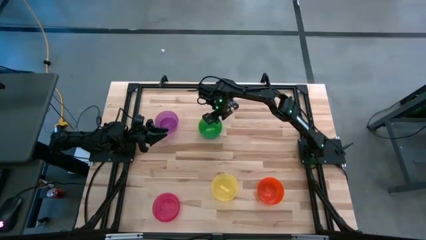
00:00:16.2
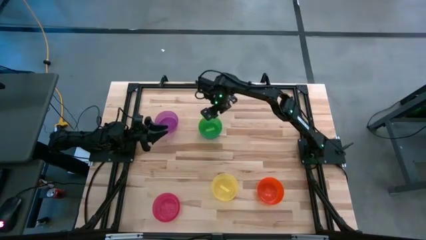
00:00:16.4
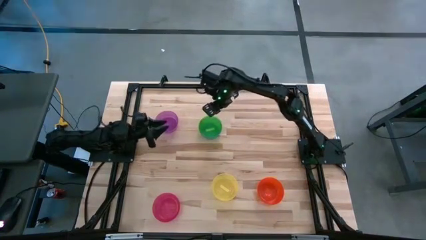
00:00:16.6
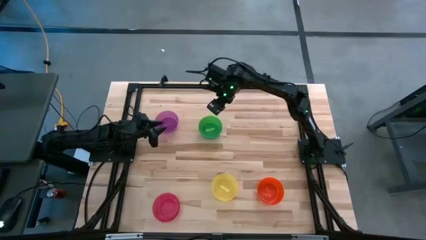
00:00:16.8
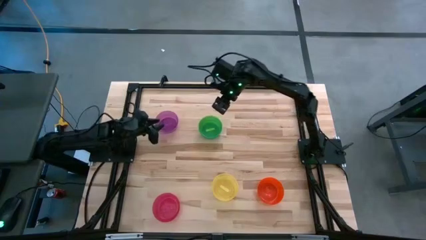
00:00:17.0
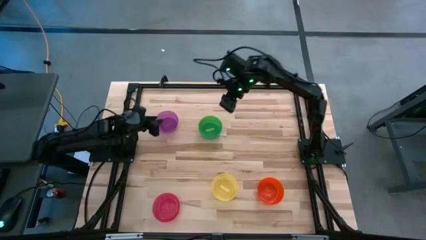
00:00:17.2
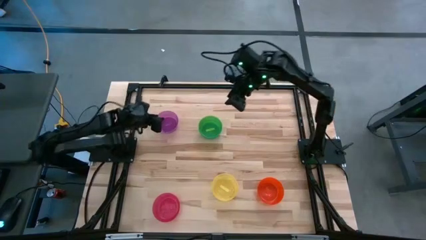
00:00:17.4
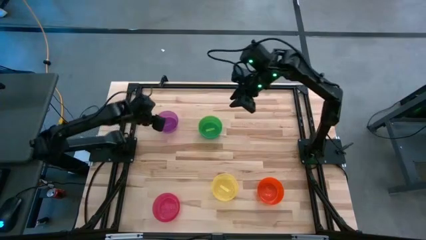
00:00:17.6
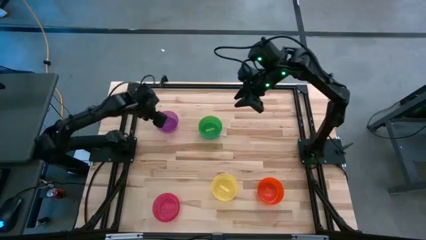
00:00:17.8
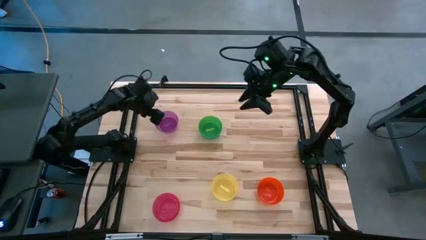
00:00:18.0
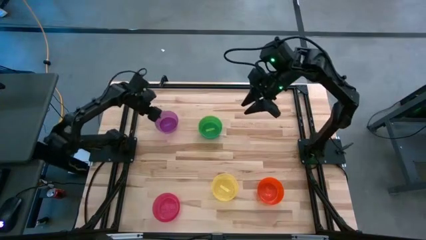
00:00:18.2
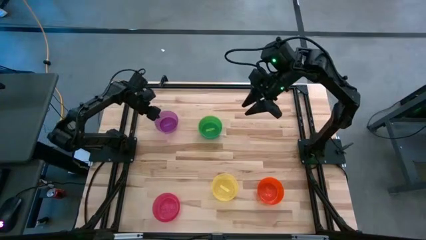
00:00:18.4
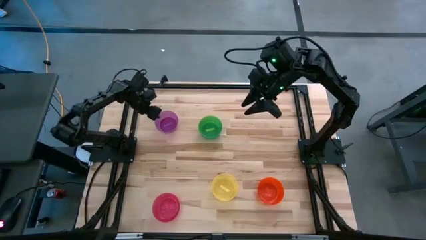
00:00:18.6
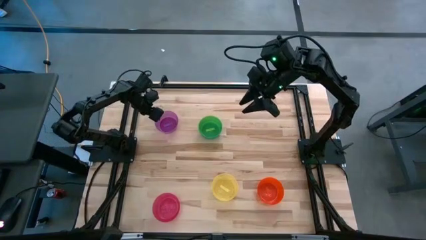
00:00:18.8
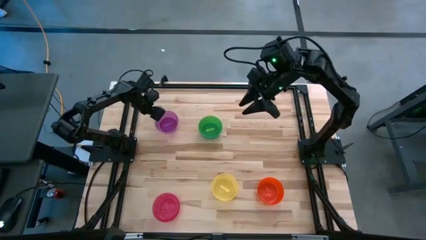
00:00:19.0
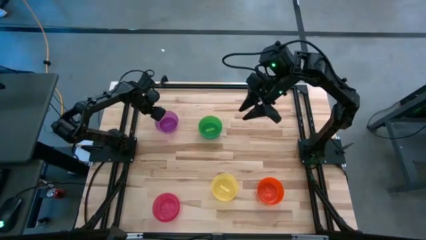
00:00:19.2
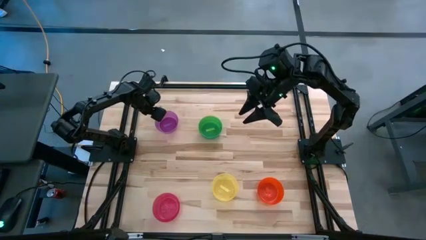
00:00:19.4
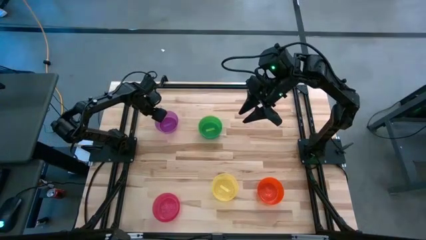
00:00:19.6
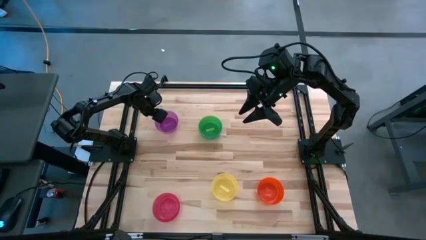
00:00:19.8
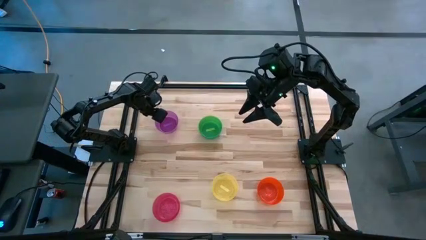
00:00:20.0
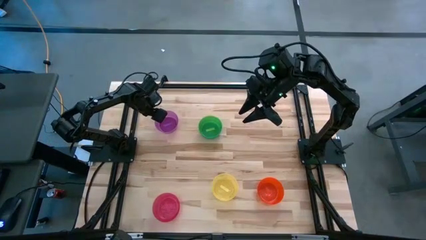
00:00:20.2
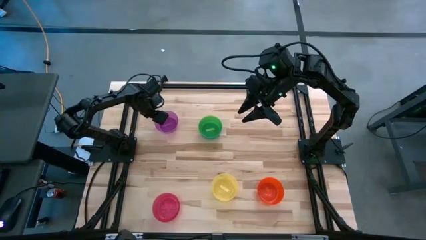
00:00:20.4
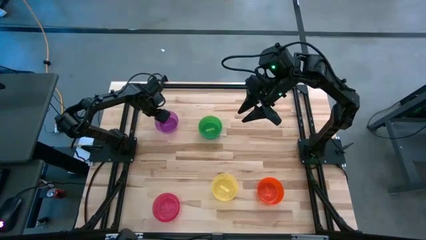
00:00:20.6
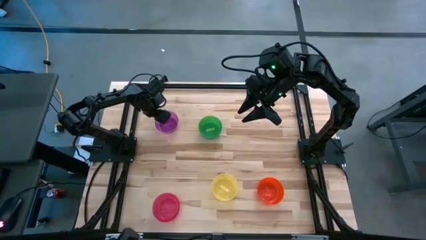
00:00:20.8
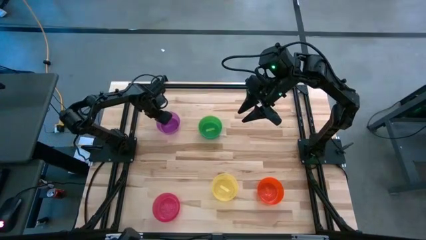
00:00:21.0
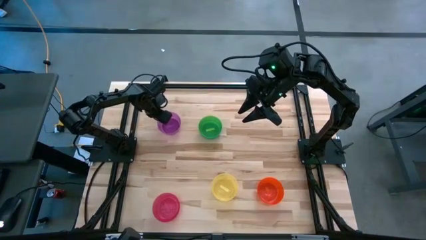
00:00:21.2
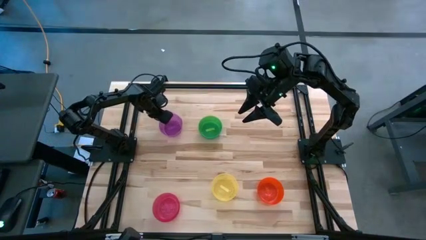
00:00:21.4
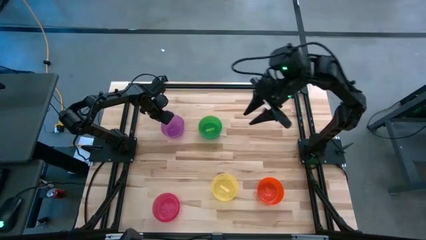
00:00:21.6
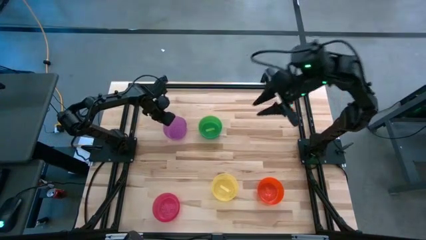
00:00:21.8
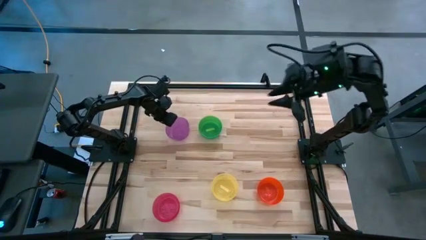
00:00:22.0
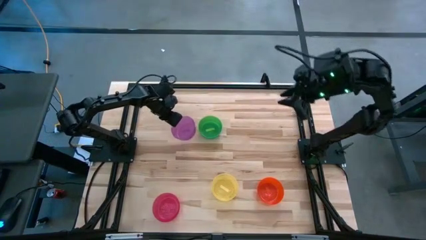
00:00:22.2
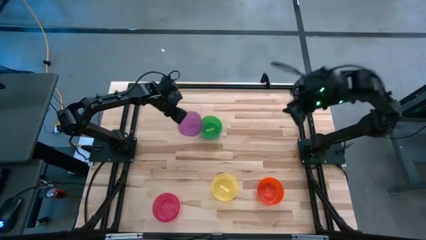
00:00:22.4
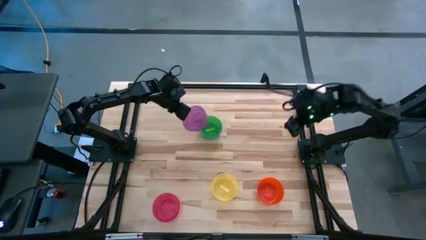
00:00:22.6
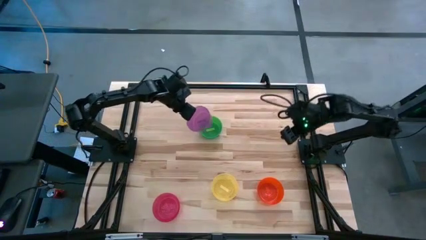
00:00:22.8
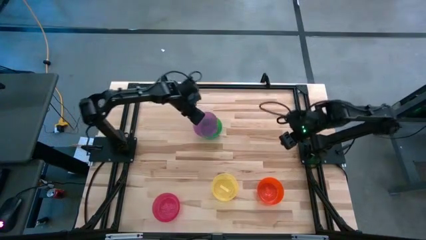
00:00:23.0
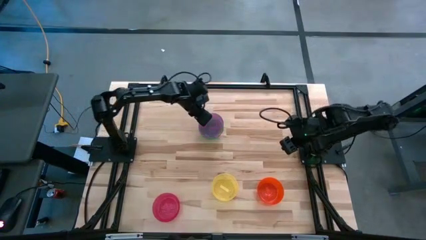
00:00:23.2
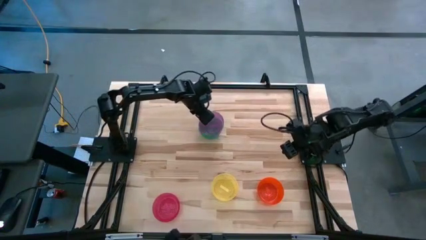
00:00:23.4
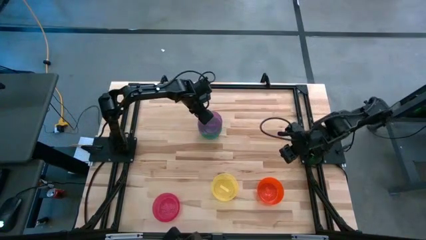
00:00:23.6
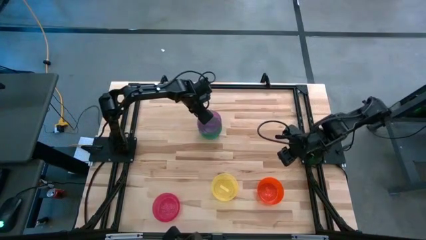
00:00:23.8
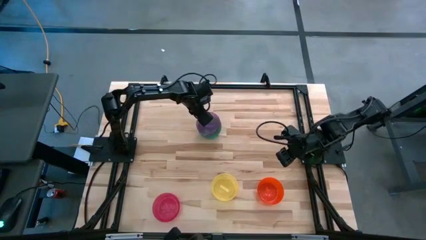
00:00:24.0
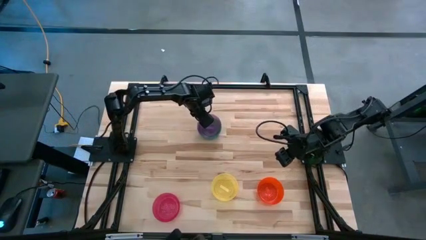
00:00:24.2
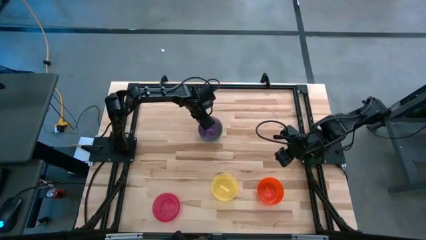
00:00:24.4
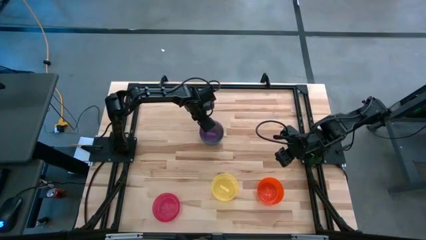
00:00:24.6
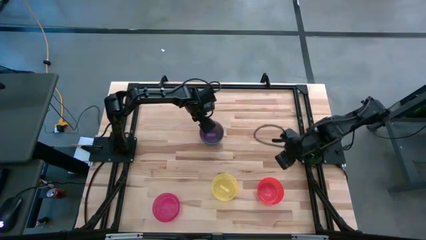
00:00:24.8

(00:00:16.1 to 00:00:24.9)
Task: Nest bowls inside each other
Stack the violet bowl on the green bowl

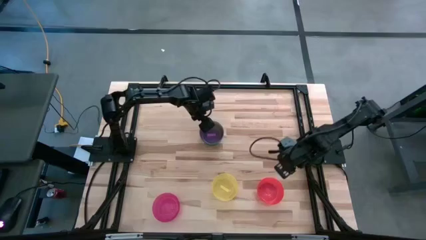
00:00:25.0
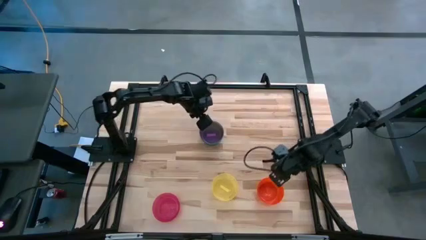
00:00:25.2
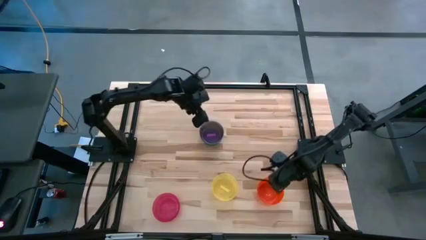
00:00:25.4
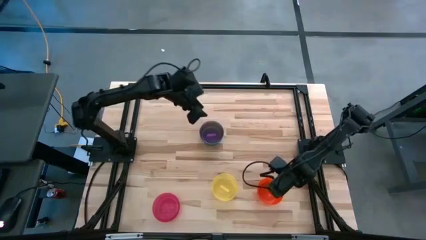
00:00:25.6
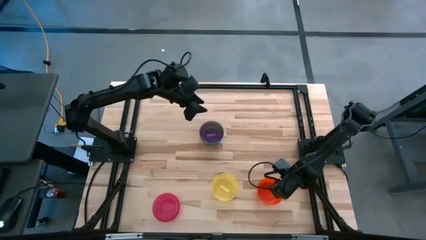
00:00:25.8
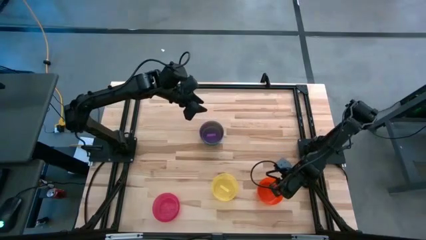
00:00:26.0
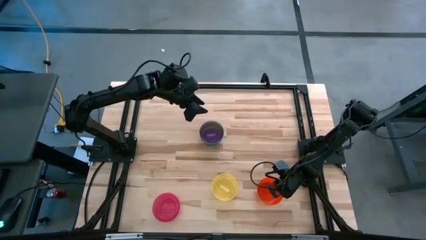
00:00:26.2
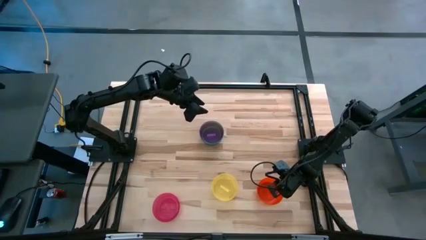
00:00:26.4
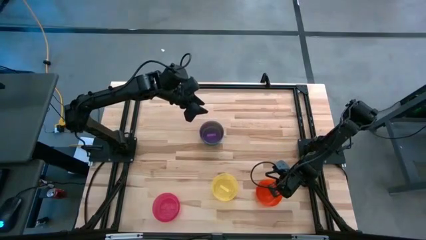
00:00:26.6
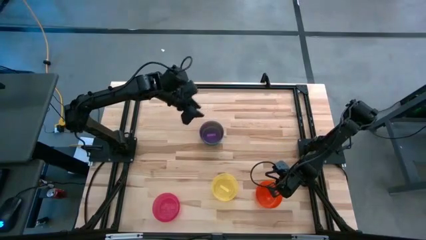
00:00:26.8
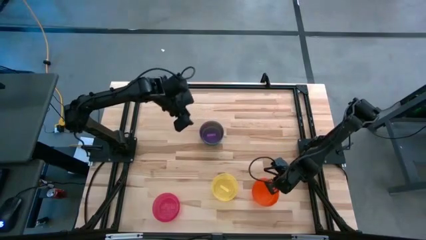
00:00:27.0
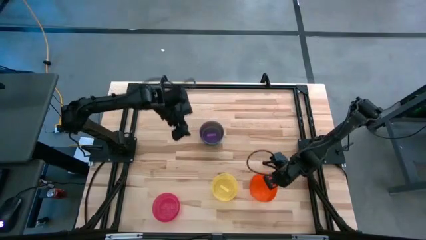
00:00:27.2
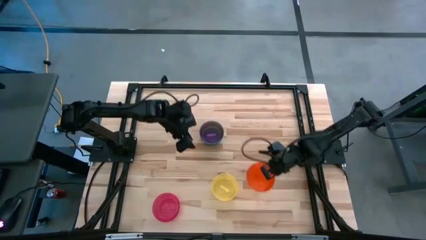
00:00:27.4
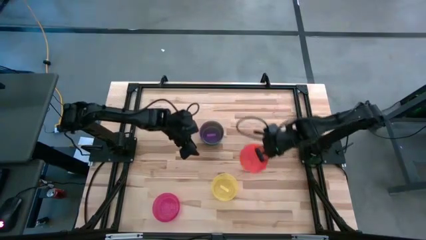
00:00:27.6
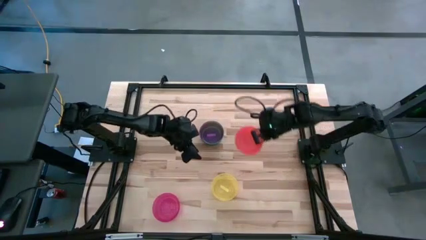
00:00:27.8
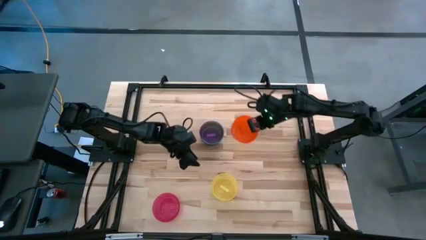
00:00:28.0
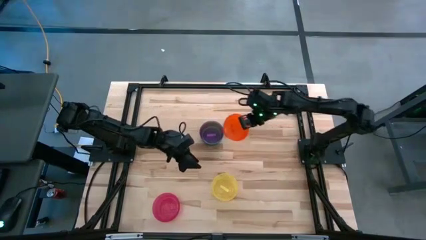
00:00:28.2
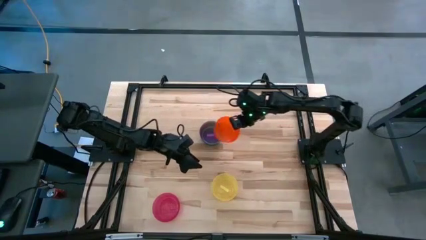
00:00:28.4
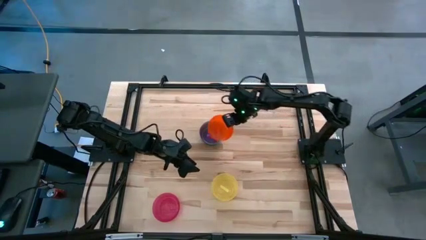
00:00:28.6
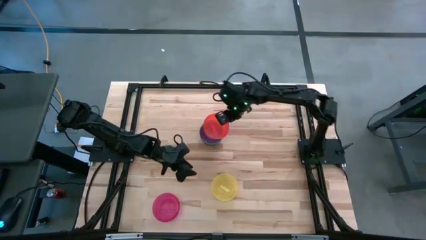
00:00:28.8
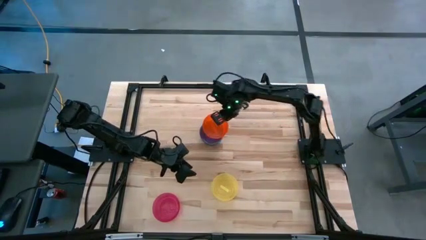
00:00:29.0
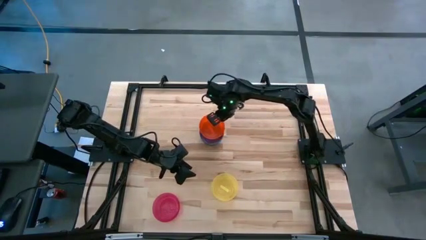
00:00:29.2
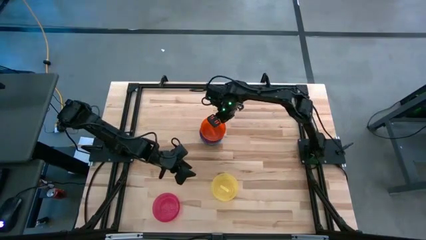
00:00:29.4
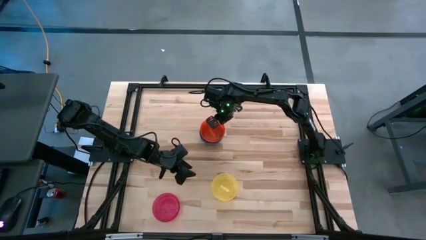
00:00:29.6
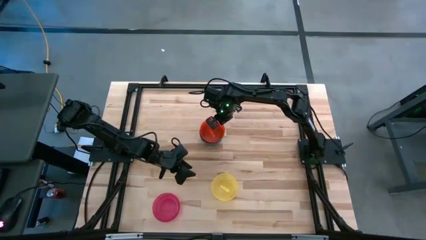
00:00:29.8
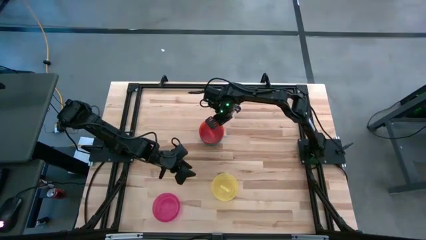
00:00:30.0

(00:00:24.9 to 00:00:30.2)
Stack the orange bowl on the violet bowl
